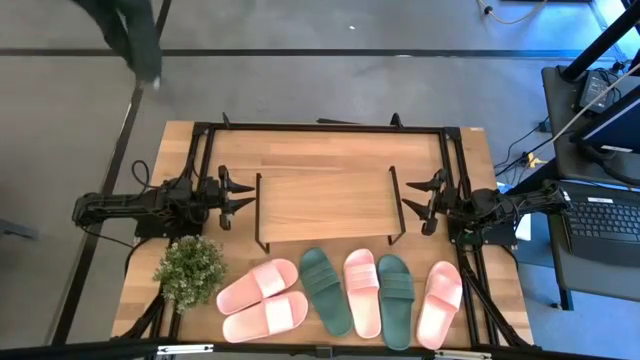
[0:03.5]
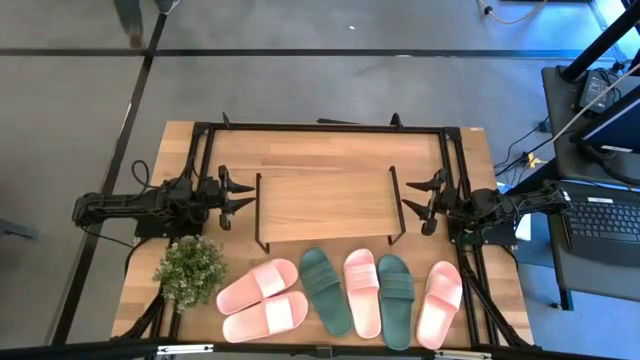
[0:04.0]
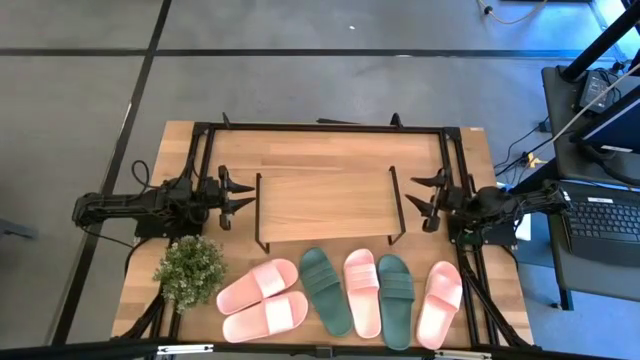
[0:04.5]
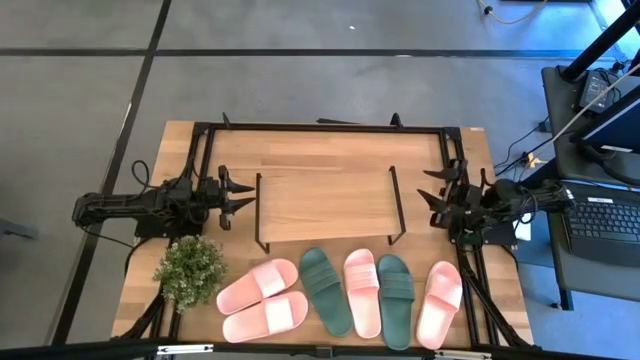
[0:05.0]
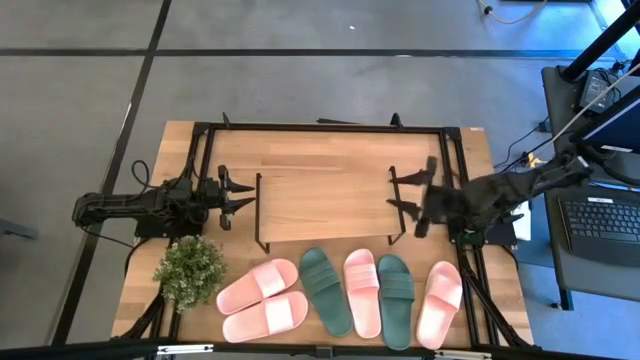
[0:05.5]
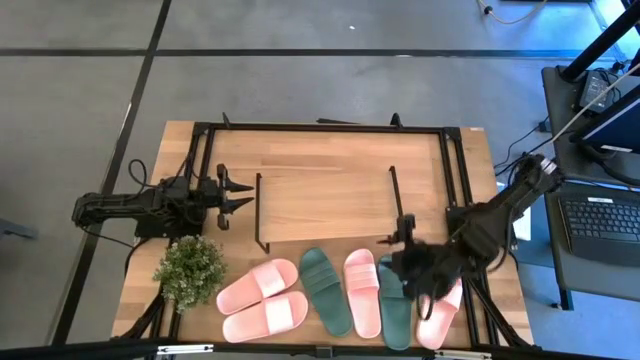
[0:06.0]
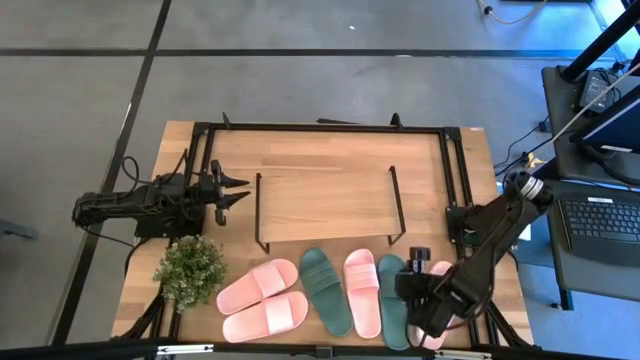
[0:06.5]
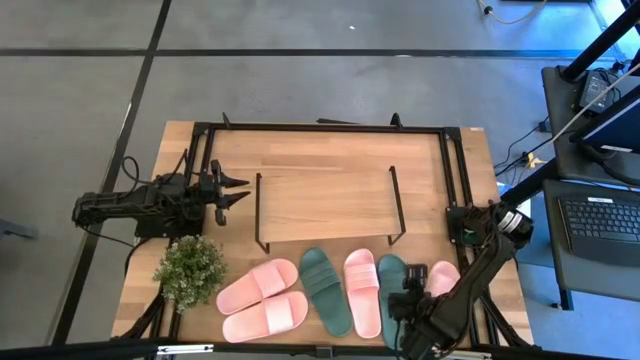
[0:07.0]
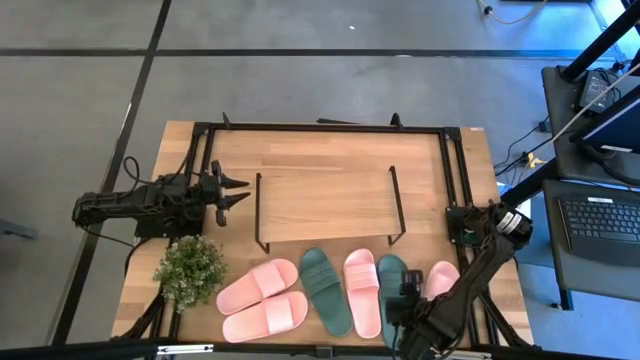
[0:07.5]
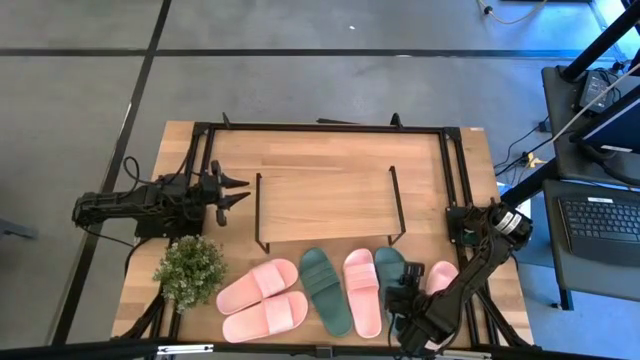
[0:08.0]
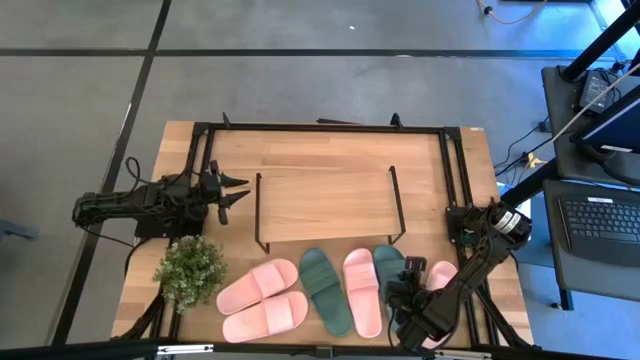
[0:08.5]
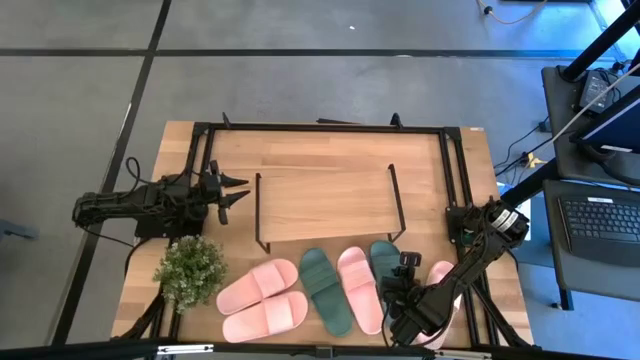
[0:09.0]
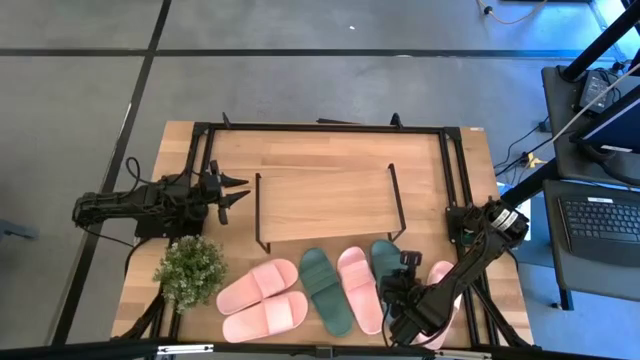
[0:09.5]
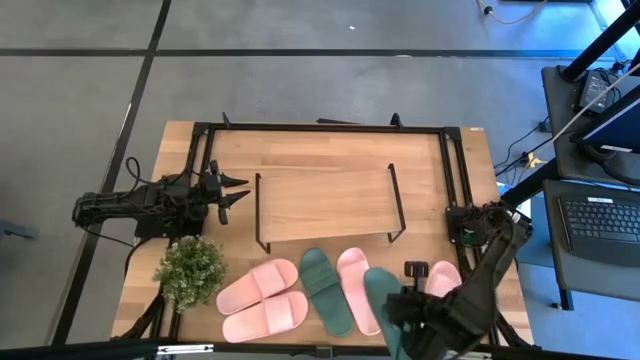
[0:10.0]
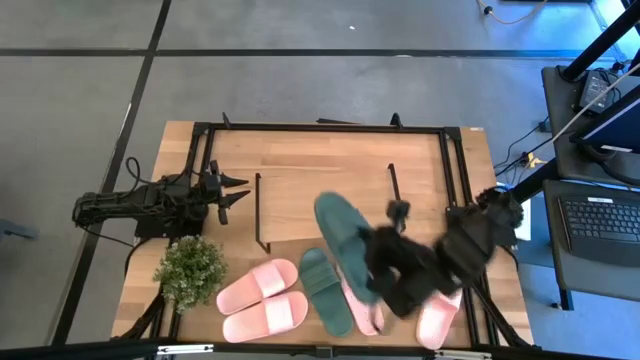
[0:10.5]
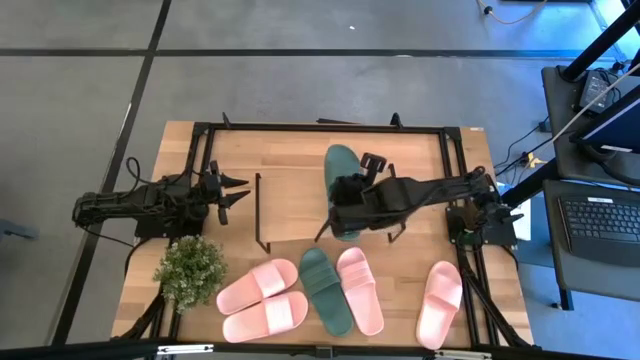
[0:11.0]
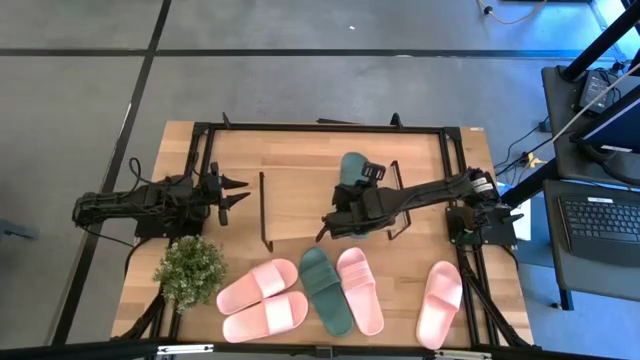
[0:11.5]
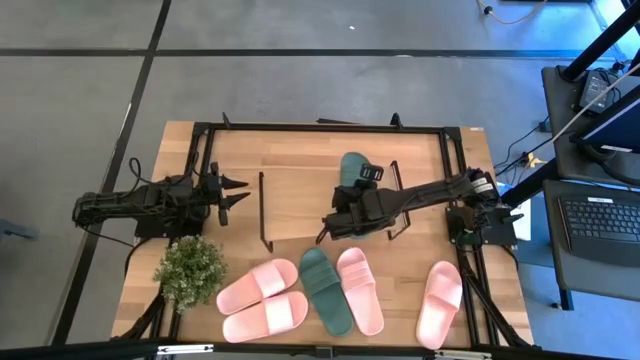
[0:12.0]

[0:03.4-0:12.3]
Task: Pick and place slides into the shelf
Put the green slide on the shelf

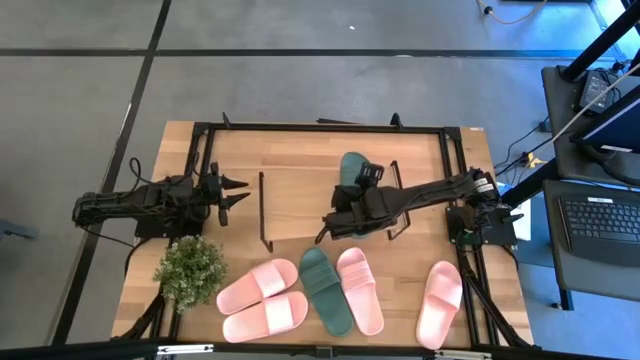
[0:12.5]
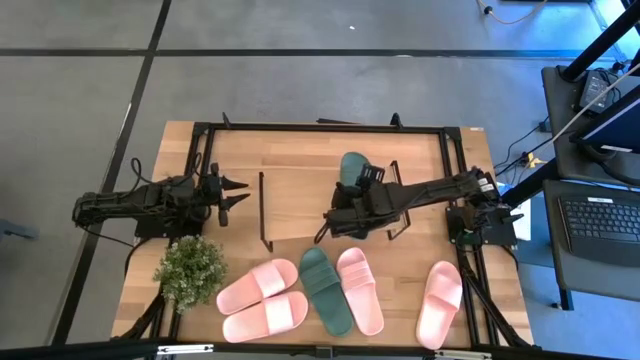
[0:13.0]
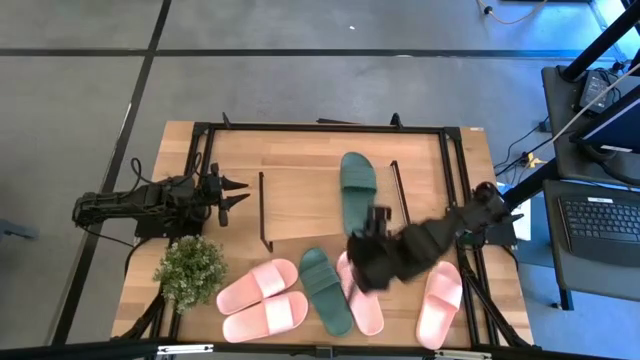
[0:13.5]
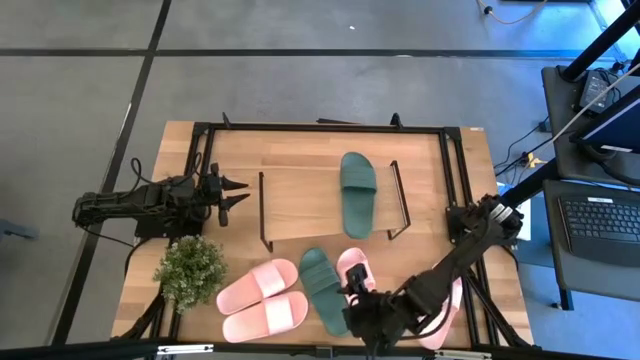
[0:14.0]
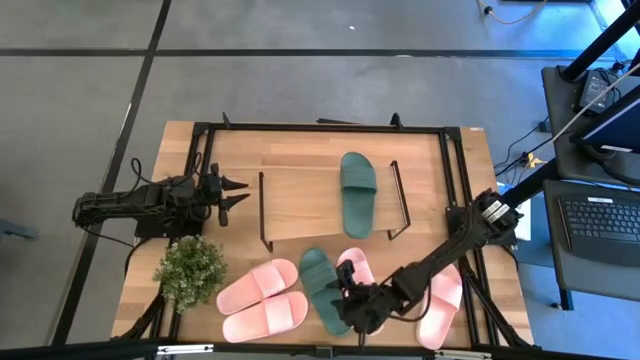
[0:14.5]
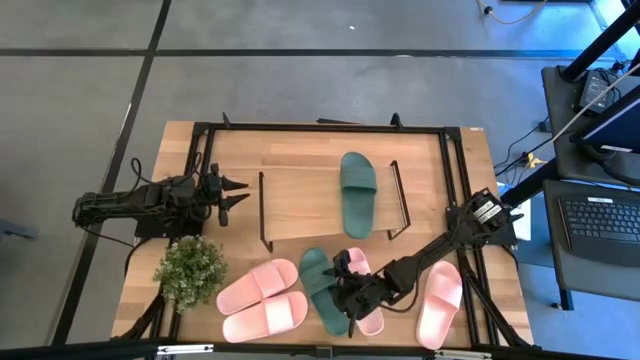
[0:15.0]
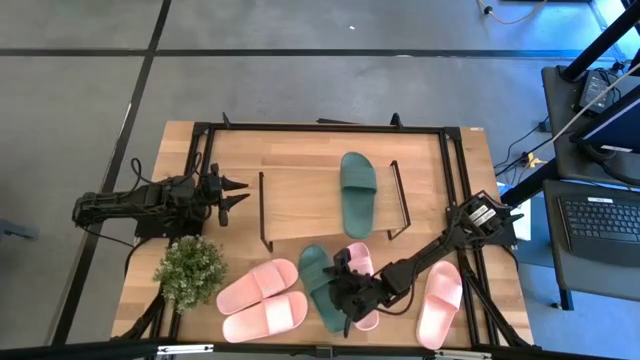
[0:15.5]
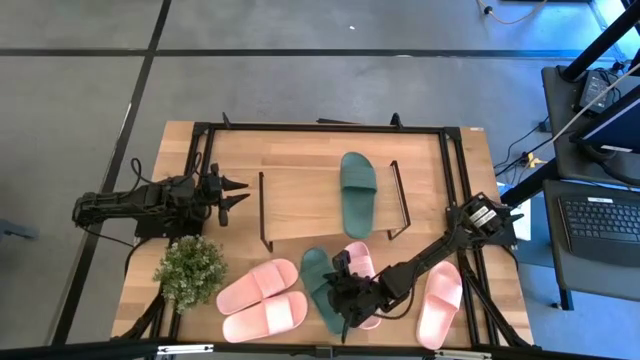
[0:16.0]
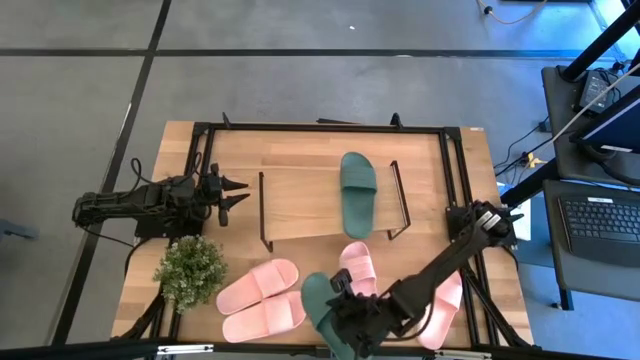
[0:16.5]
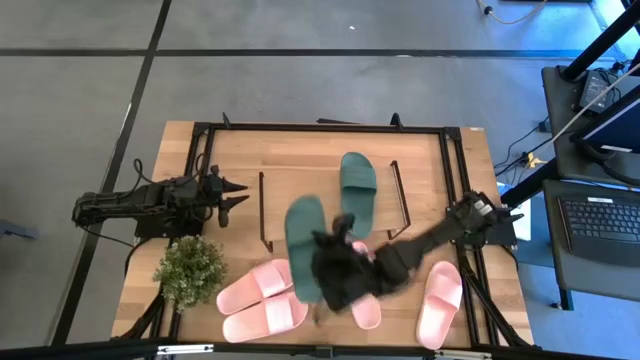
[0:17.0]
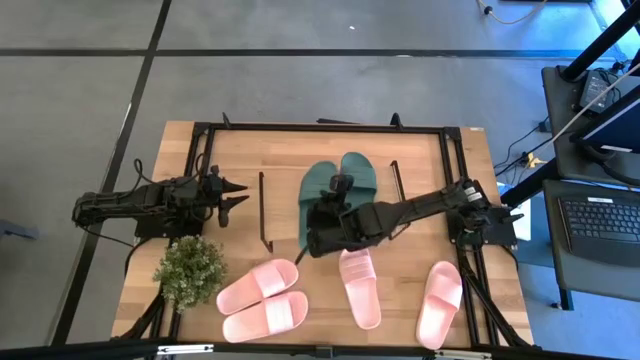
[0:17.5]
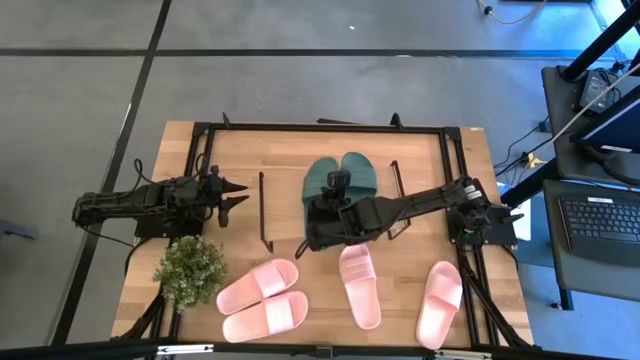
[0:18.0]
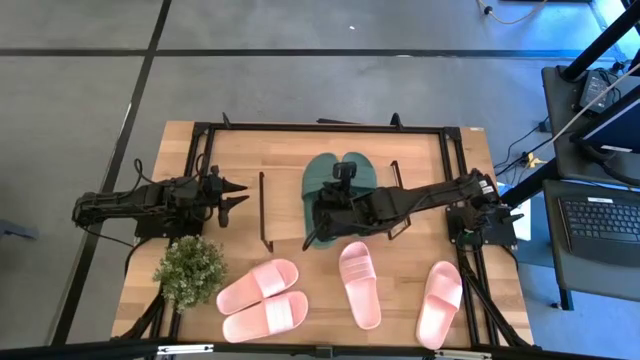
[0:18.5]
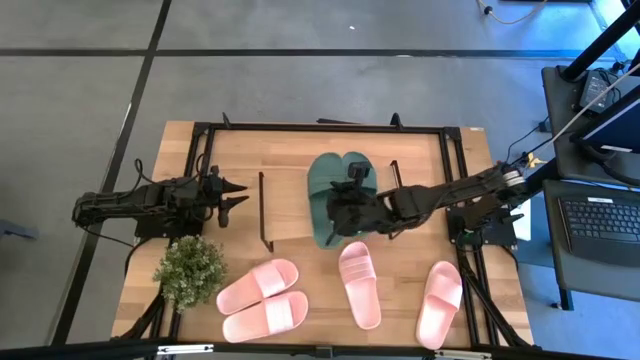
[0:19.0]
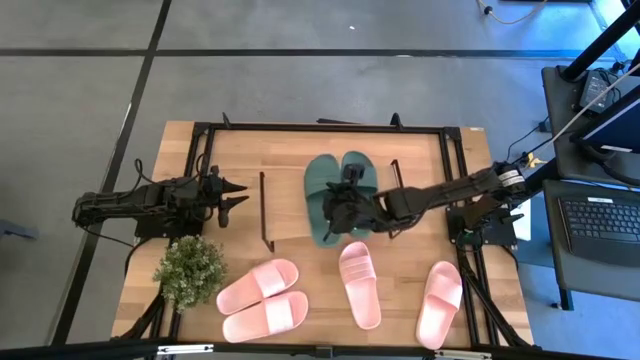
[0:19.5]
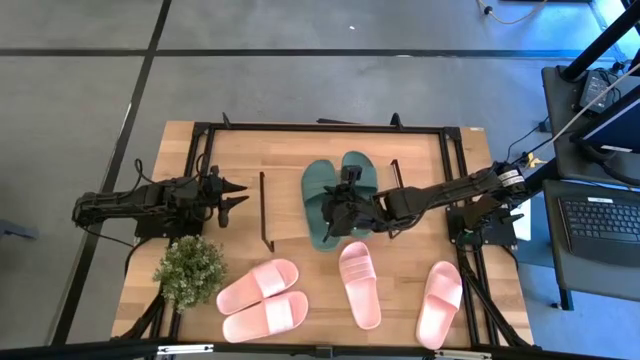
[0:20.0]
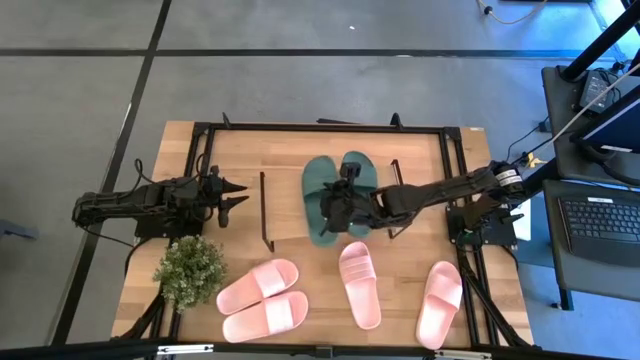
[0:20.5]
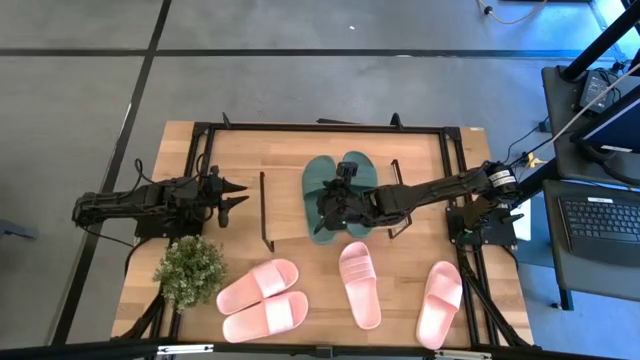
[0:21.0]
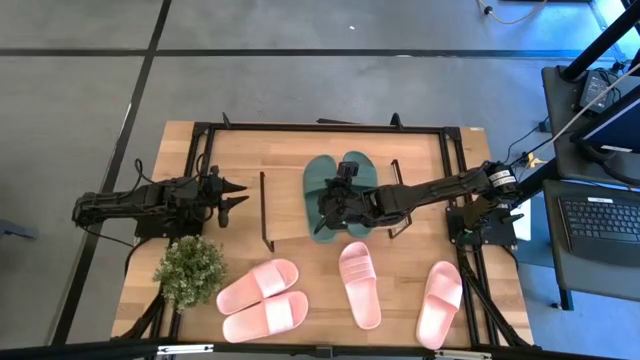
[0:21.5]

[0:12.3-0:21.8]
Put the green slide on the shelf

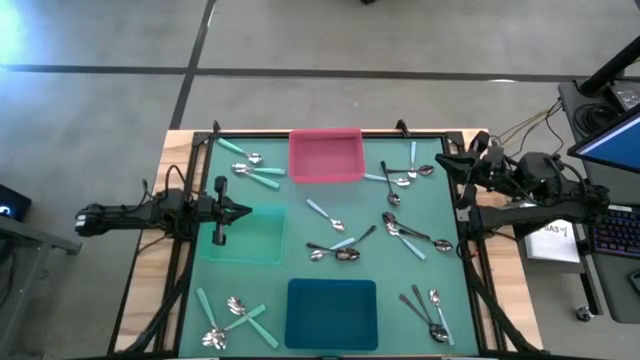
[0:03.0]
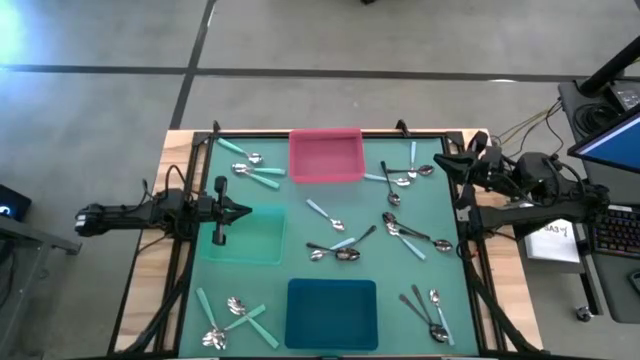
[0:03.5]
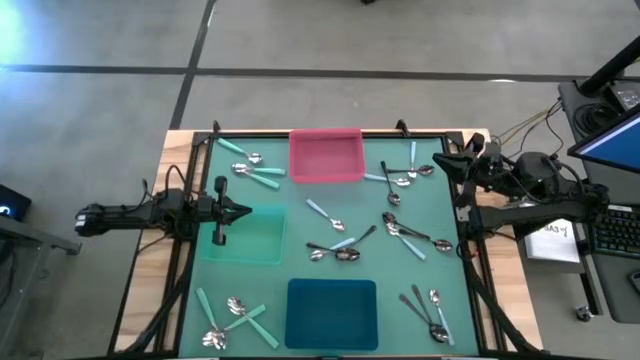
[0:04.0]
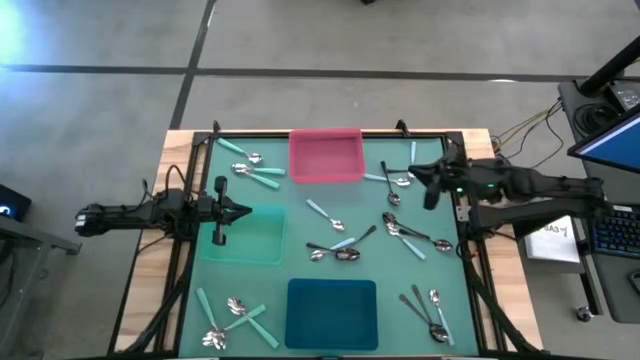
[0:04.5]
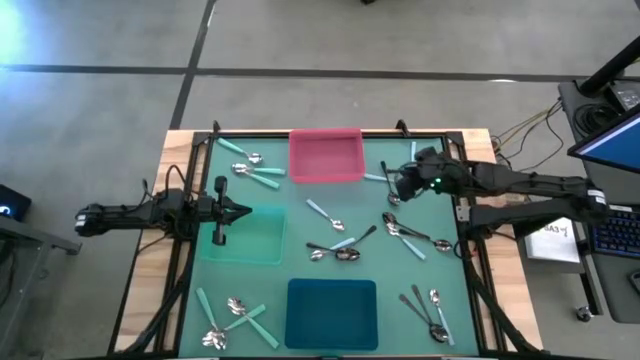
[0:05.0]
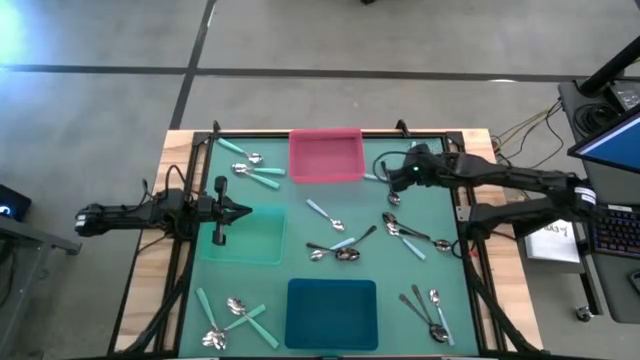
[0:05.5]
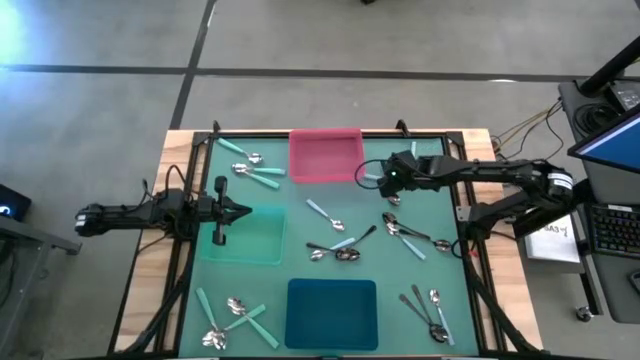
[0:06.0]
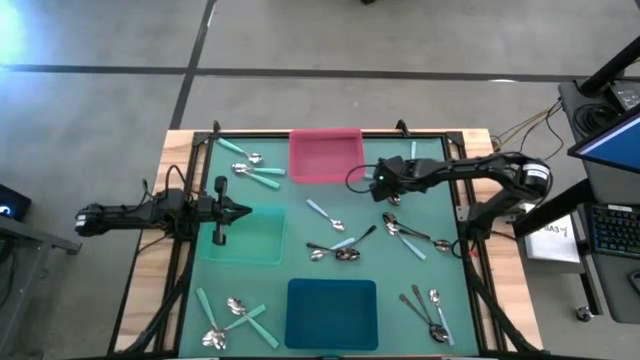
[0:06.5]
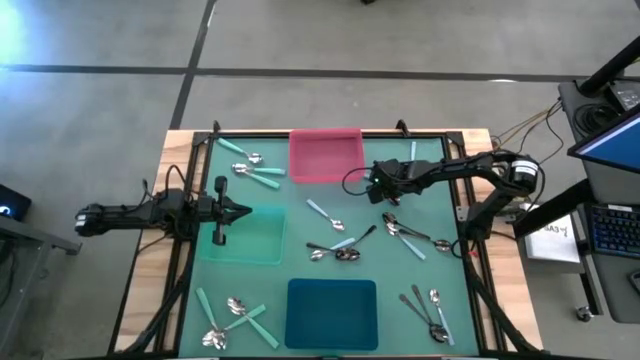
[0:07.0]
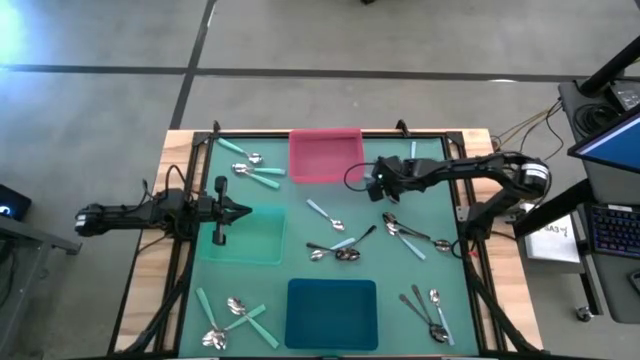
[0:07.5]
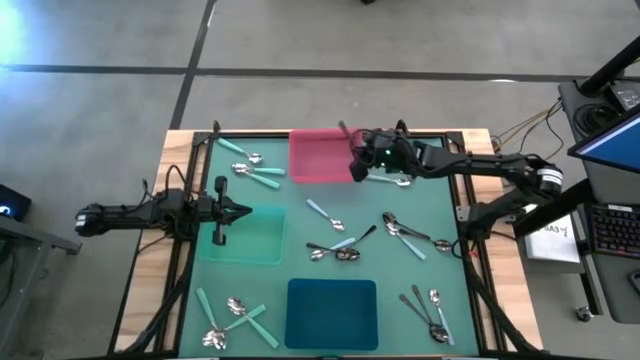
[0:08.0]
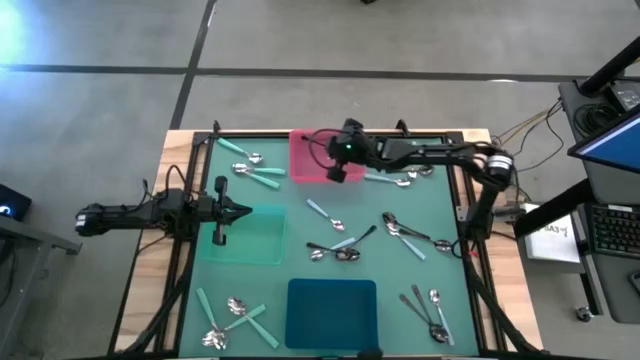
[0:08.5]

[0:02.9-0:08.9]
Task: Sort silverware by color (type)
Put the black spoon into the red bin
